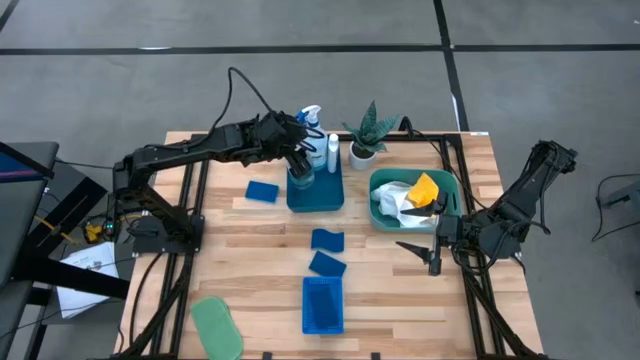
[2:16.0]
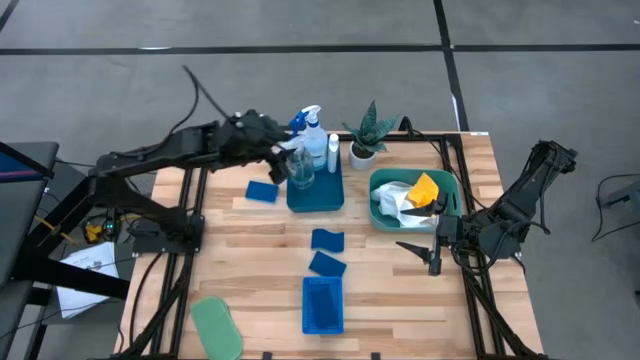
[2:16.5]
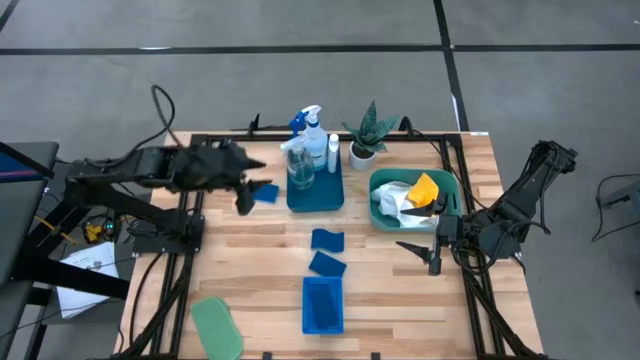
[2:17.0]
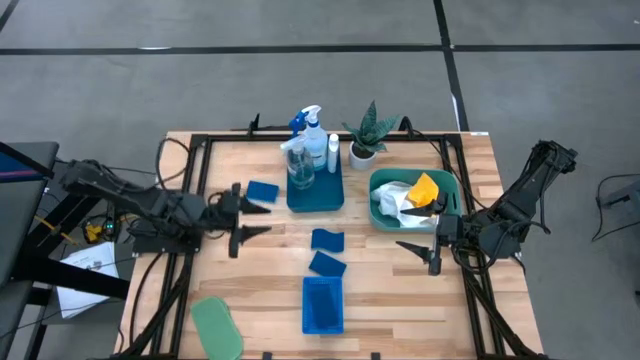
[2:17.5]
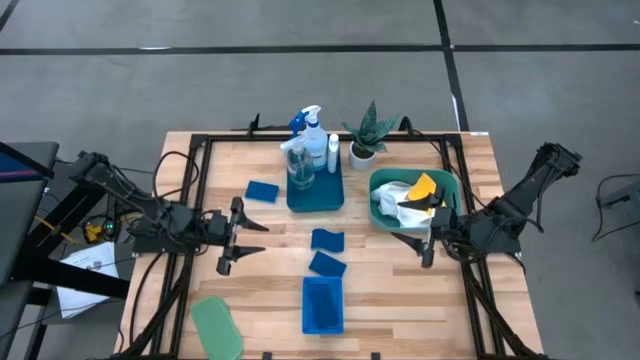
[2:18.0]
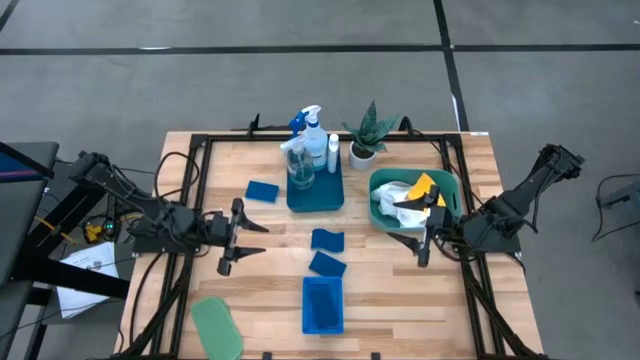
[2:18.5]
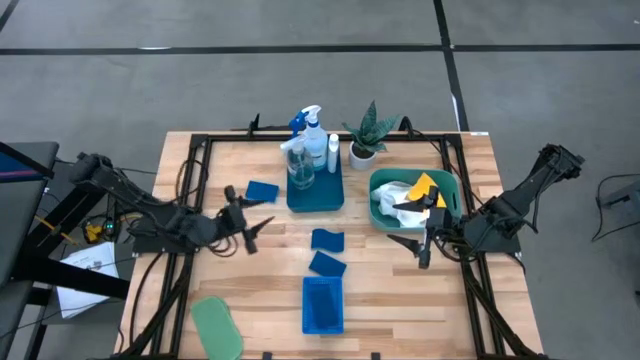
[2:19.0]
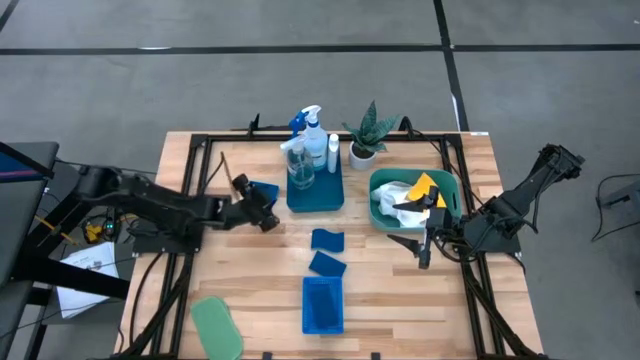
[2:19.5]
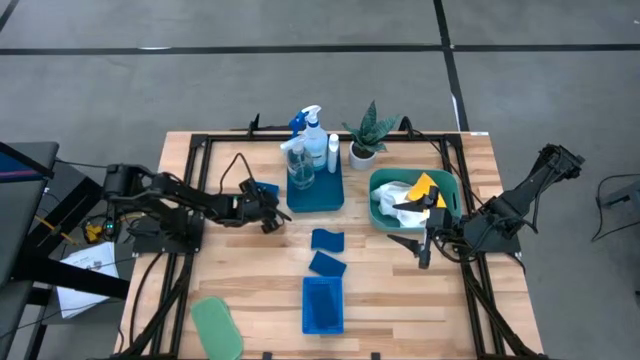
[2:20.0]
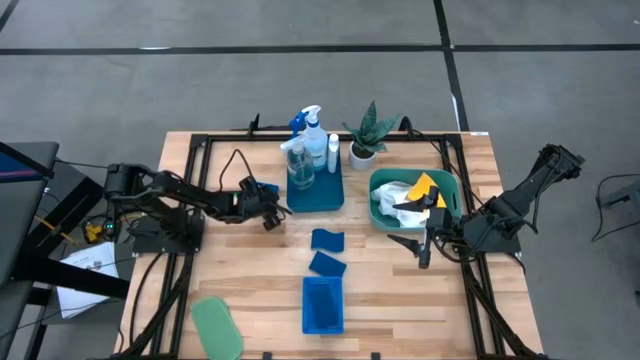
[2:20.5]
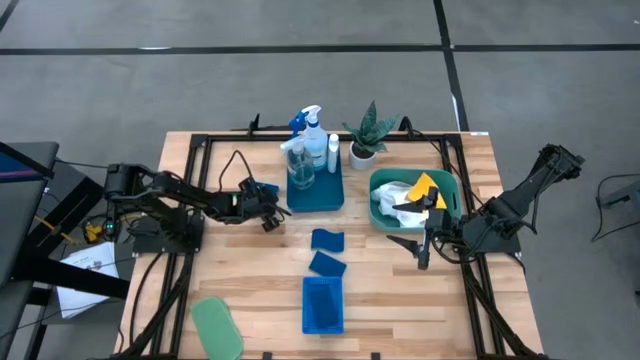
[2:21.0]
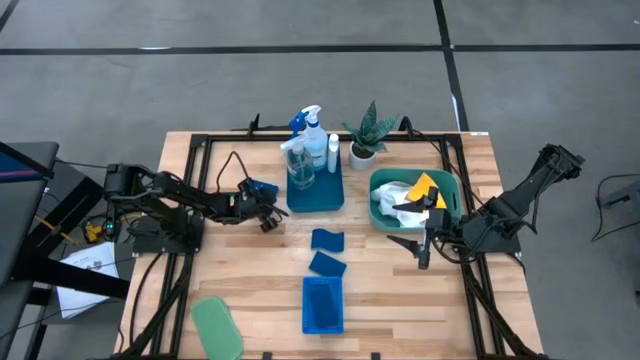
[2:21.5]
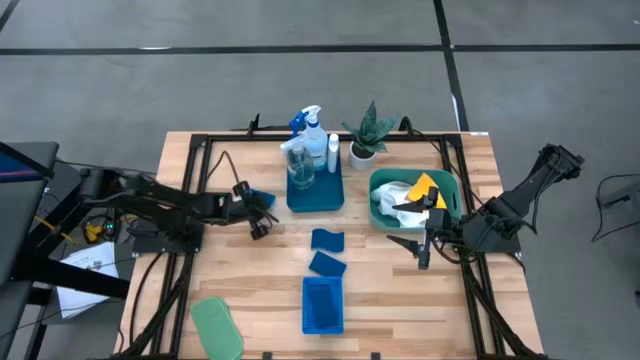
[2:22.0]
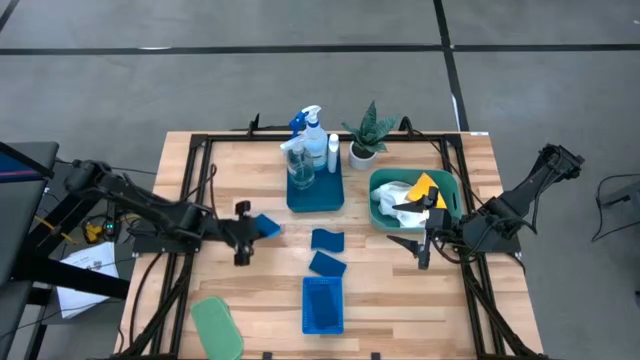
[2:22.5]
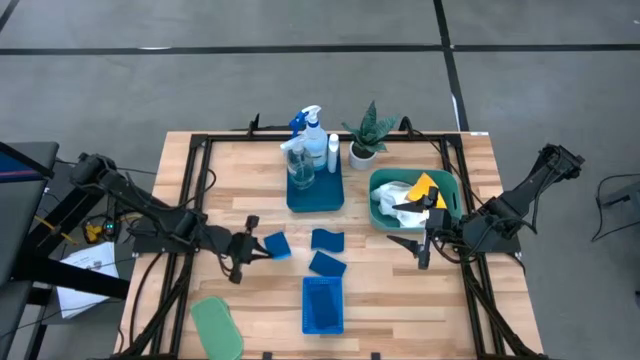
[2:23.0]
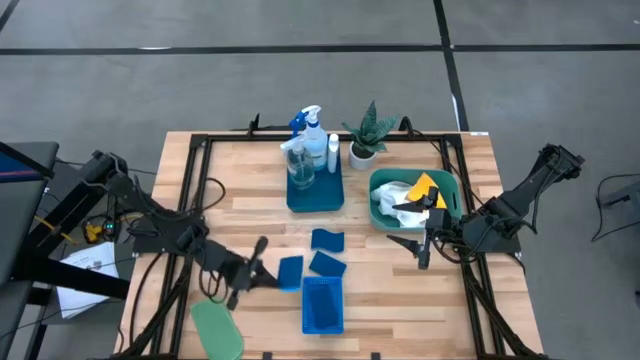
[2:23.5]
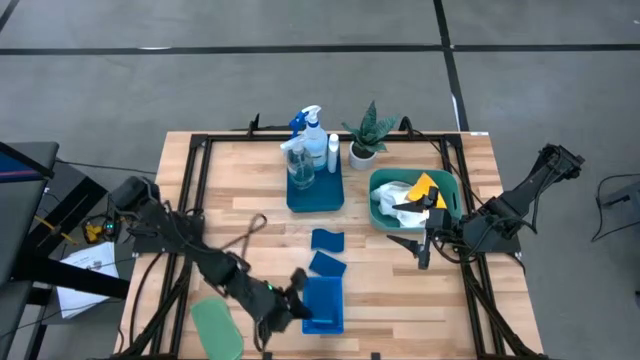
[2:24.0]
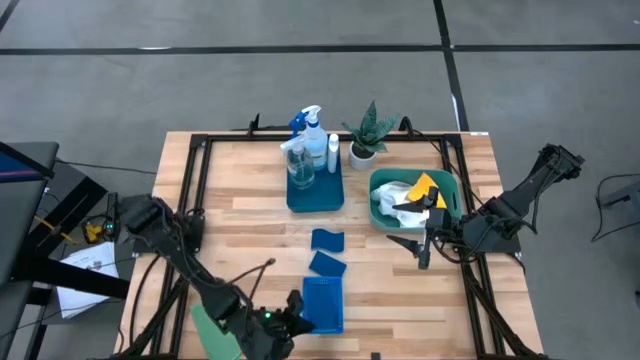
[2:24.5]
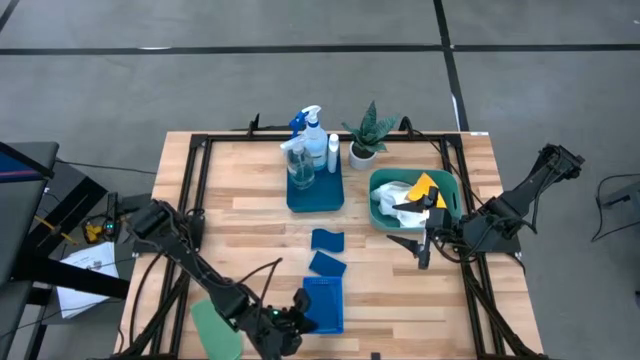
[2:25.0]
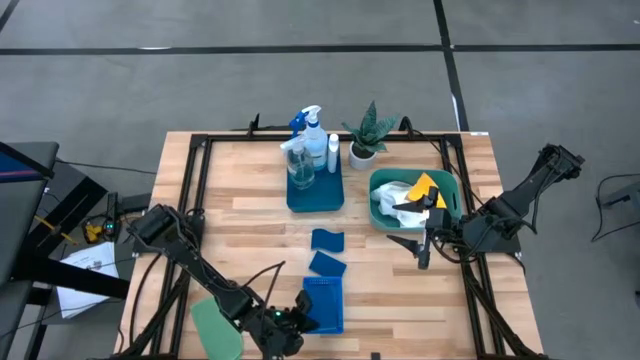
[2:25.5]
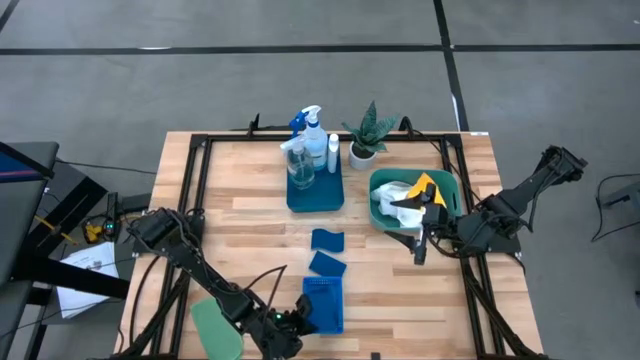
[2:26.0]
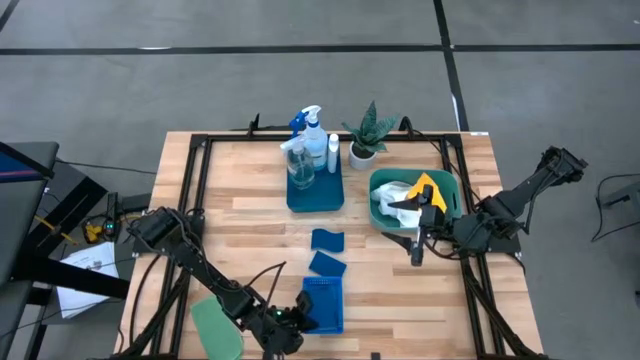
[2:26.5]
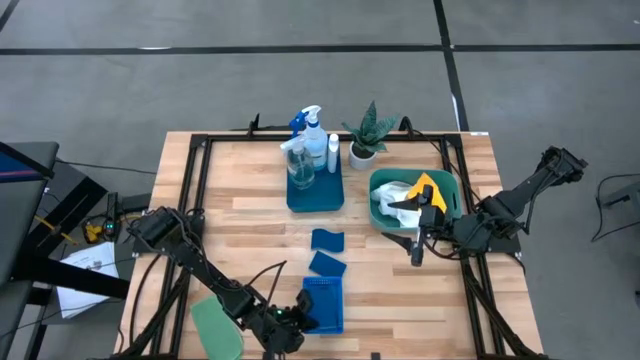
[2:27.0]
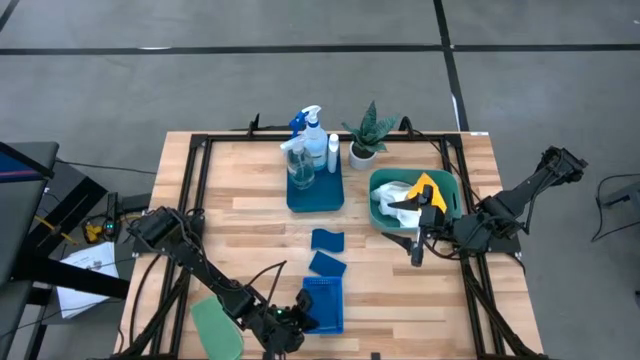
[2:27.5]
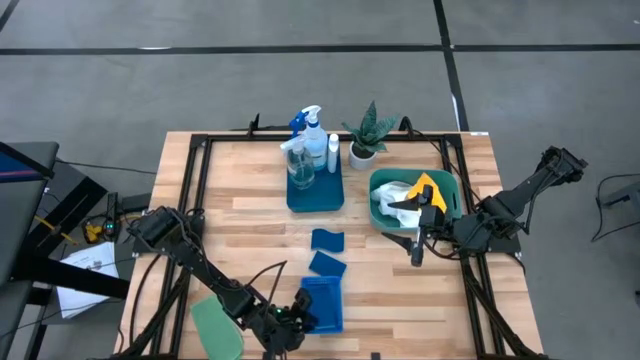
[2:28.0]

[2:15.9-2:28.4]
Task: Pick & Place Kitchen Items
Put the blue sponge into the blue basket

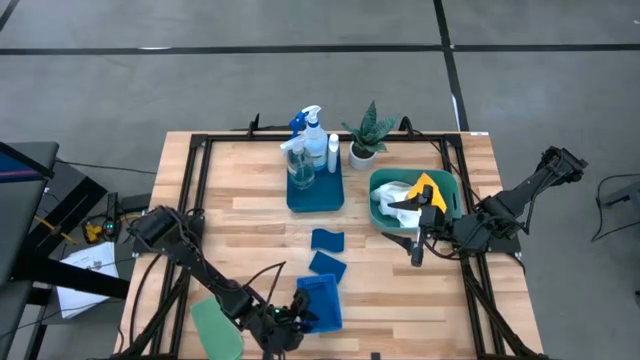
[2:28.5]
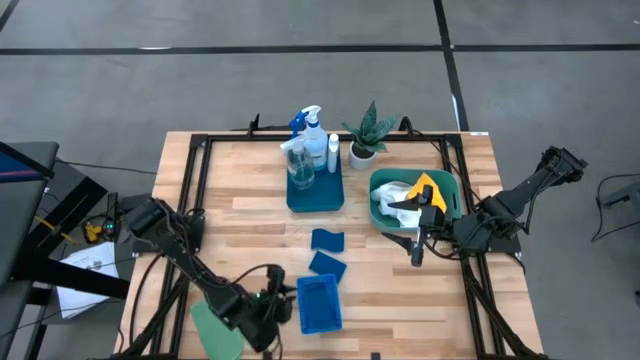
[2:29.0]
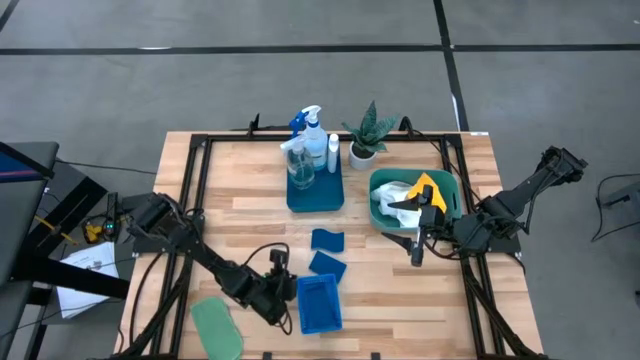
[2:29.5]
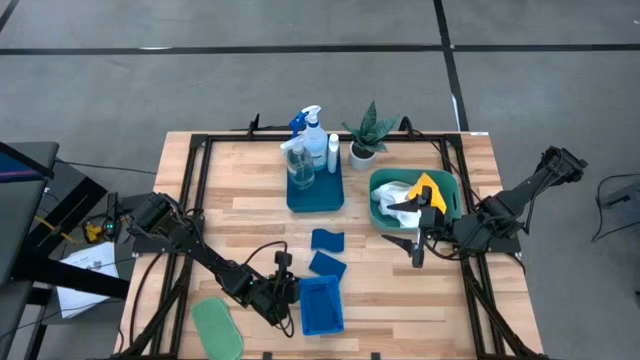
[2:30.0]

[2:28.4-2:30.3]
Adjust the blue basket

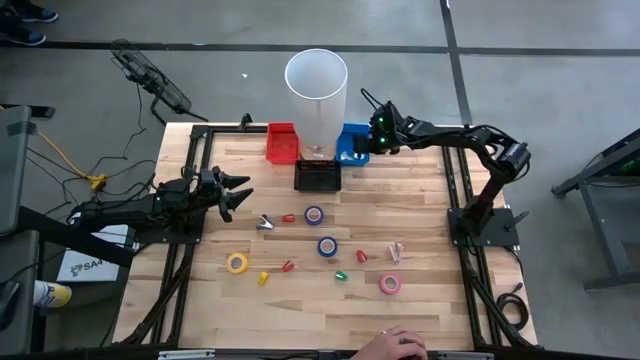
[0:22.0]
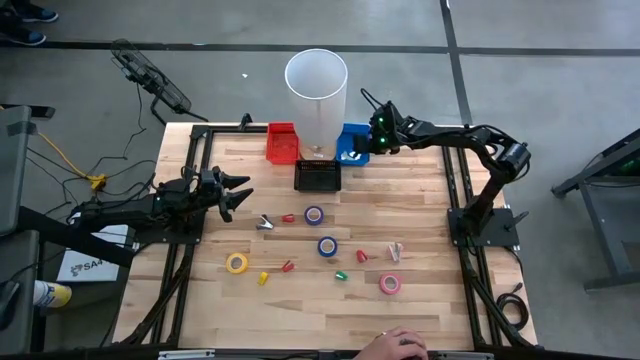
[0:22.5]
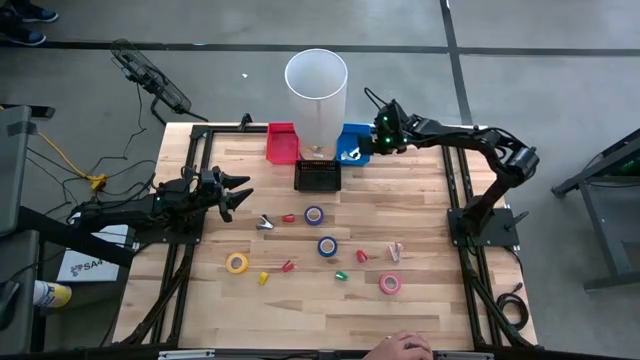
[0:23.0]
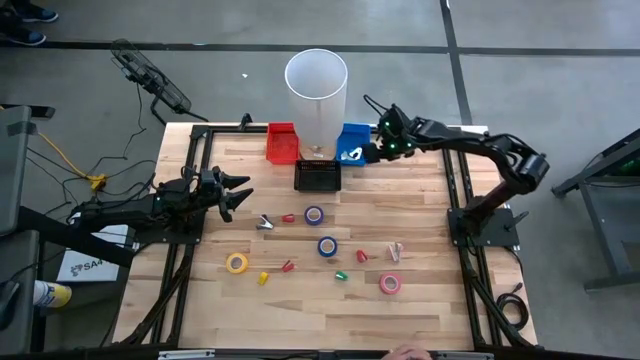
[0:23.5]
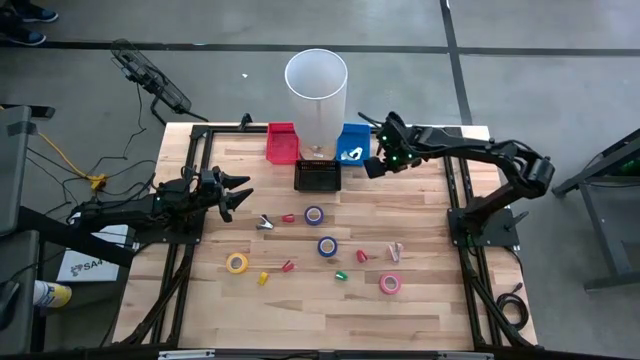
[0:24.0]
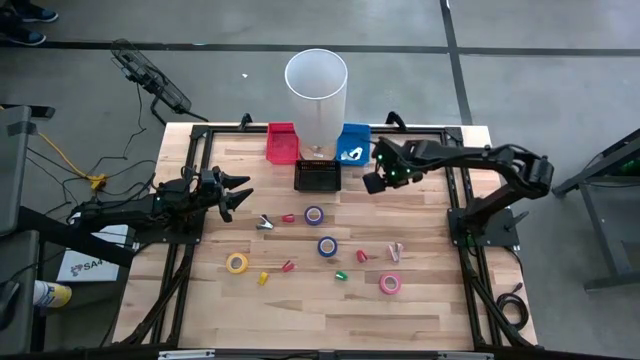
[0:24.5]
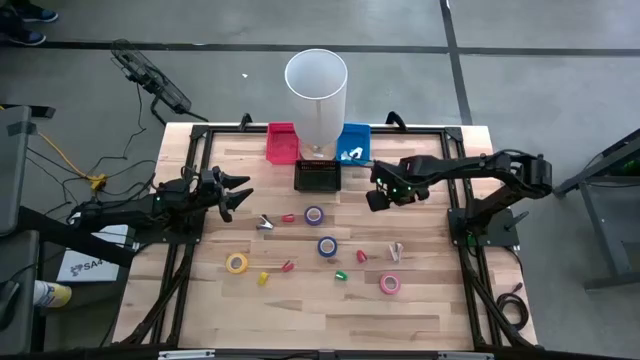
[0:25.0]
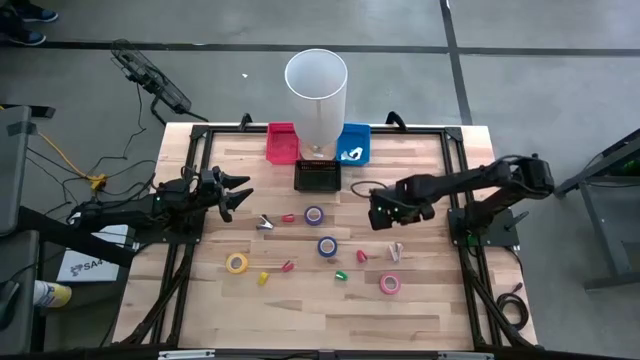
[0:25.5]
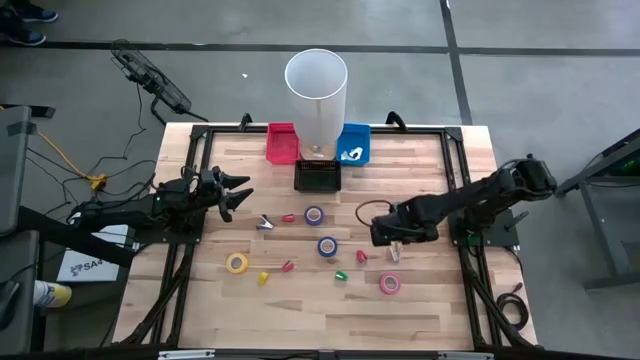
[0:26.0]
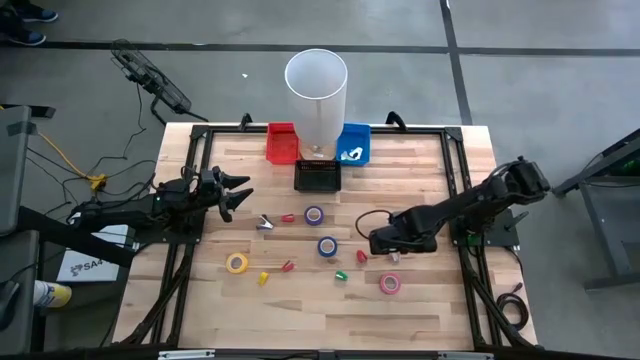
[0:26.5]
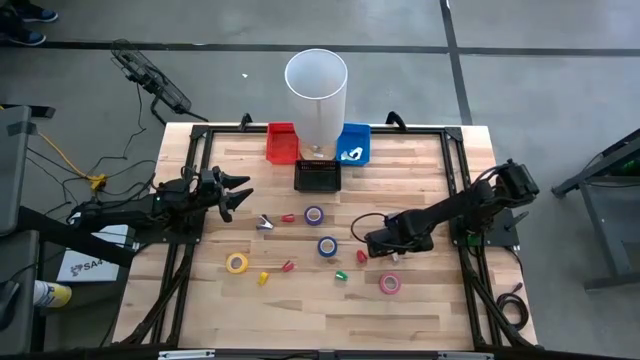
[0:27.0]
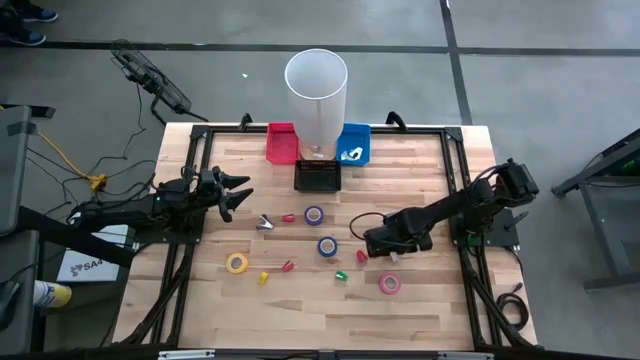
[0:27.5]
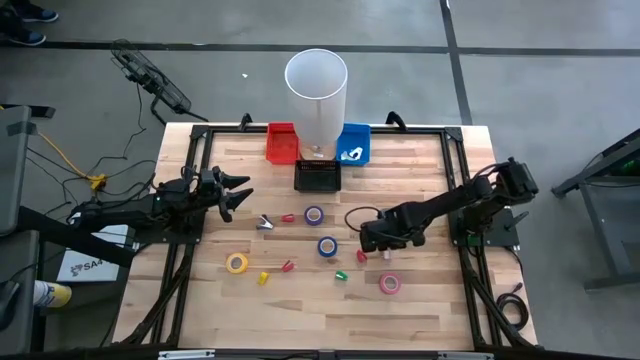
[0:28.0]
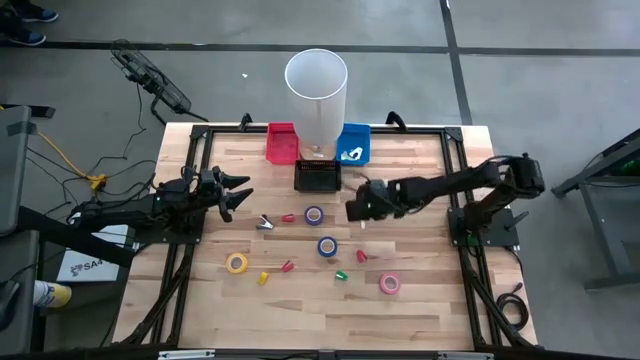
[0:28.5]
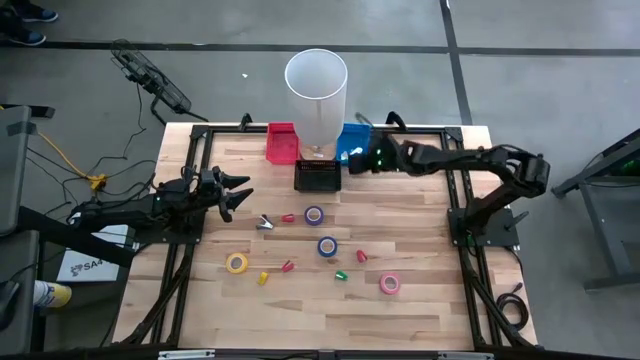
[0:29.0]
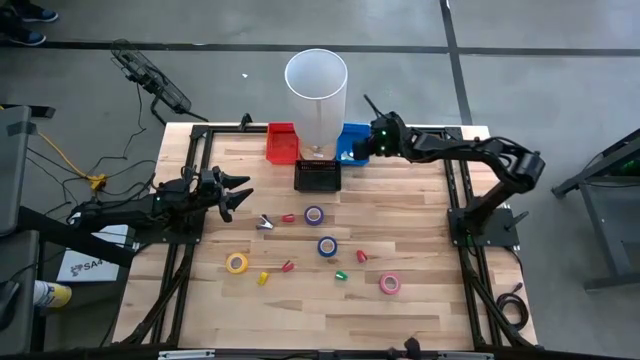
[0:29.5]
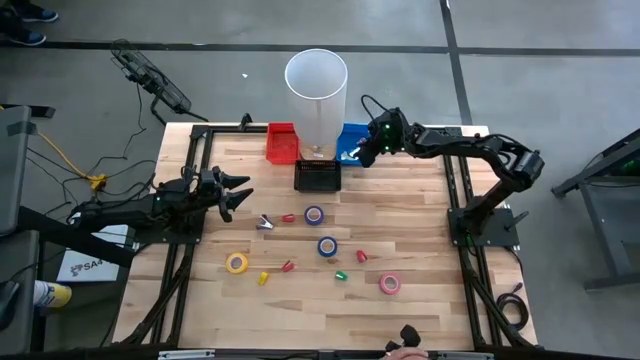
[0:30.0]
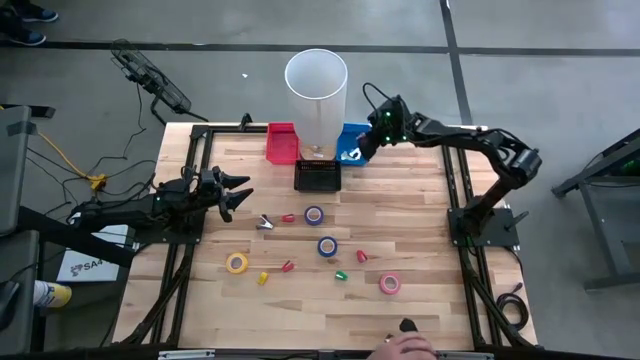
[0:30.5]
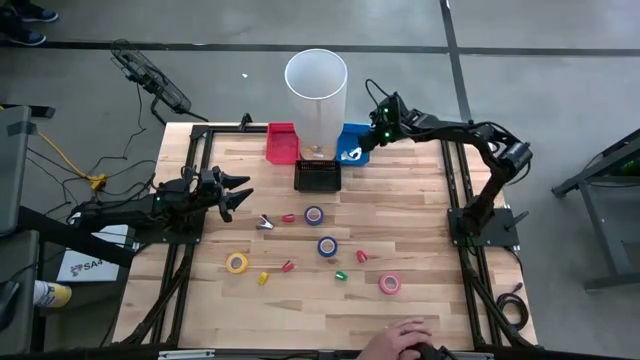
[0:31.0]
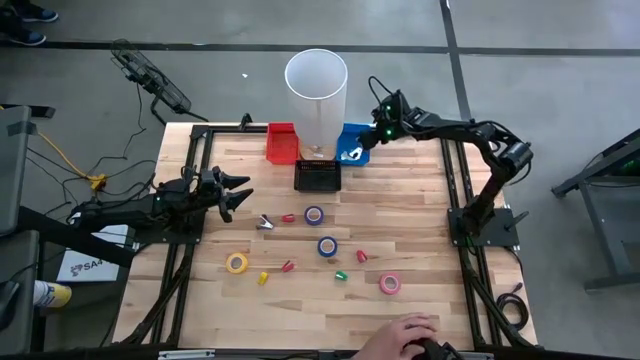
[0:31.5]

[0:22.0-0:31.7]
Task: Pick and place Stapler, Stapler remover, tape
Put the pink staple remover into the blue bin
